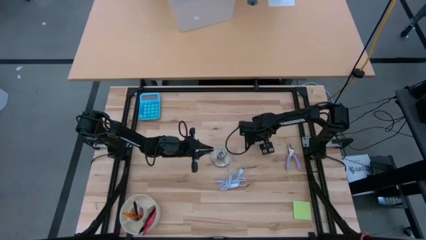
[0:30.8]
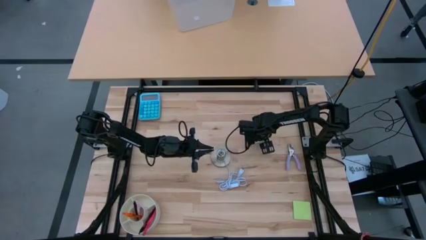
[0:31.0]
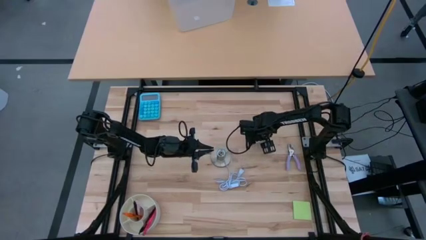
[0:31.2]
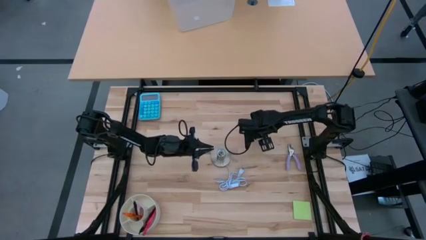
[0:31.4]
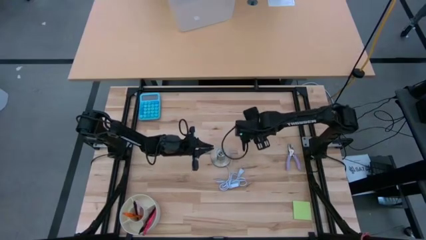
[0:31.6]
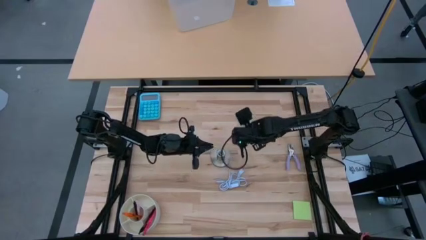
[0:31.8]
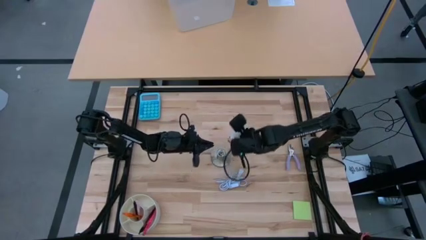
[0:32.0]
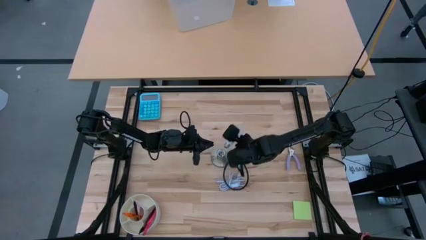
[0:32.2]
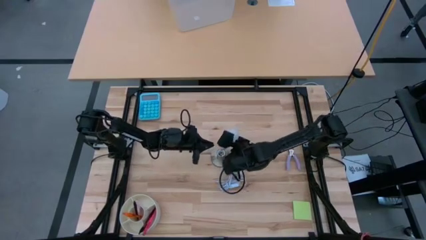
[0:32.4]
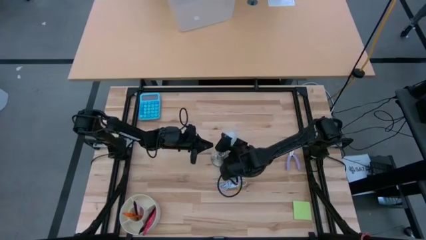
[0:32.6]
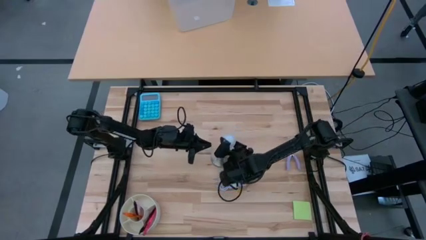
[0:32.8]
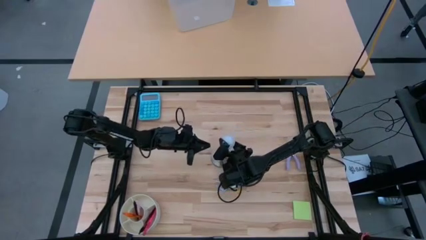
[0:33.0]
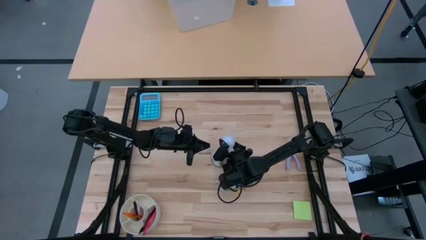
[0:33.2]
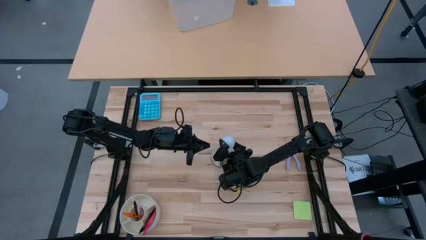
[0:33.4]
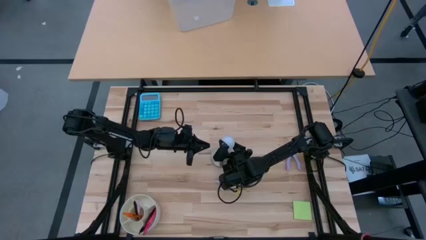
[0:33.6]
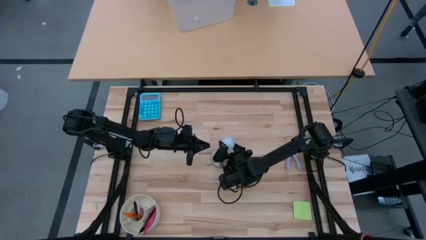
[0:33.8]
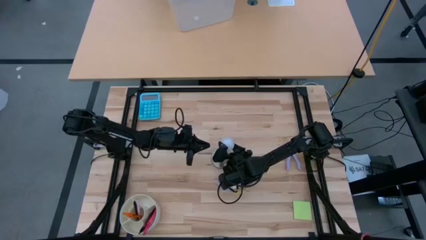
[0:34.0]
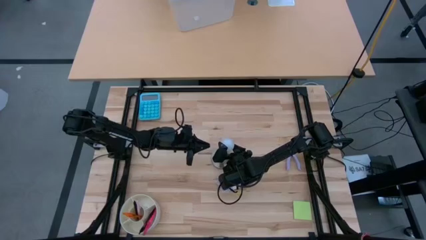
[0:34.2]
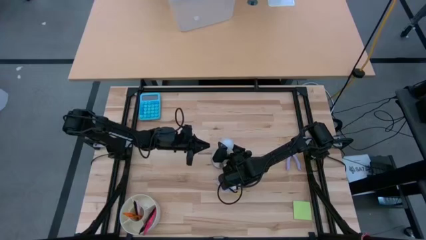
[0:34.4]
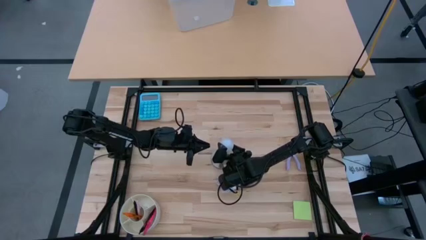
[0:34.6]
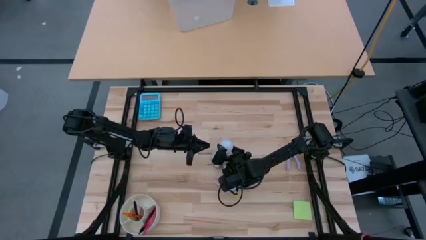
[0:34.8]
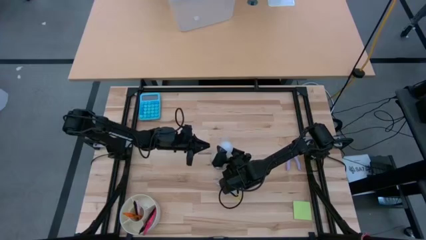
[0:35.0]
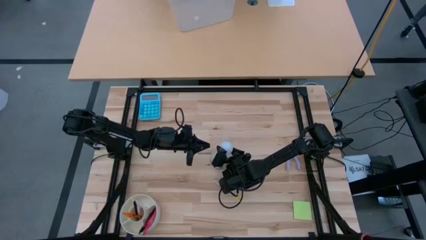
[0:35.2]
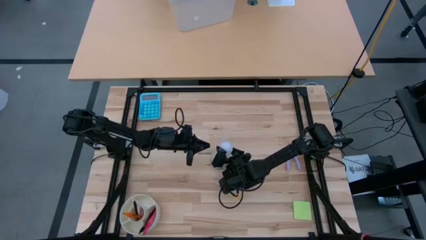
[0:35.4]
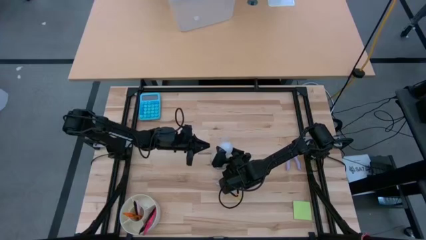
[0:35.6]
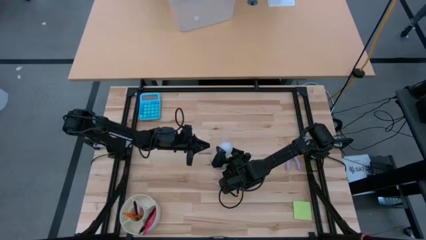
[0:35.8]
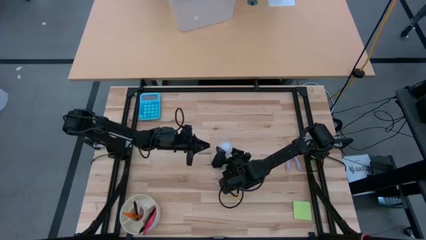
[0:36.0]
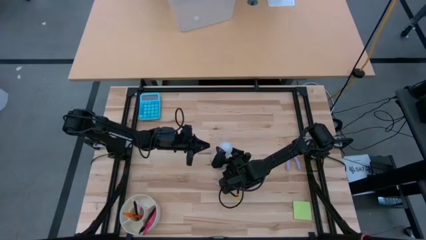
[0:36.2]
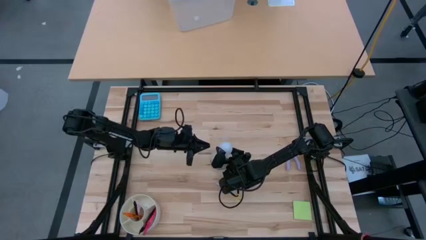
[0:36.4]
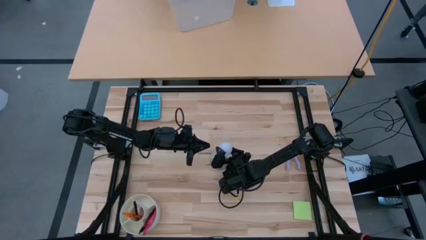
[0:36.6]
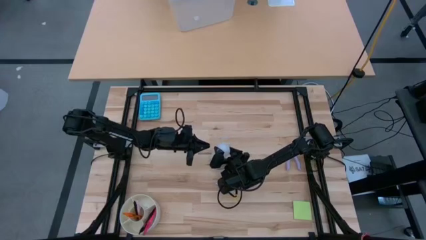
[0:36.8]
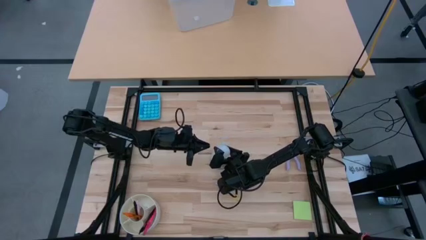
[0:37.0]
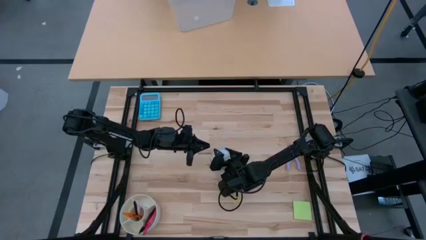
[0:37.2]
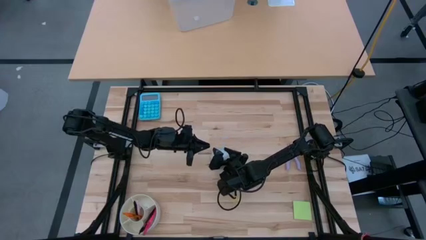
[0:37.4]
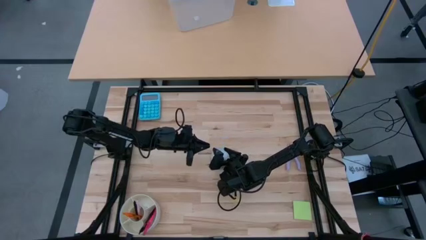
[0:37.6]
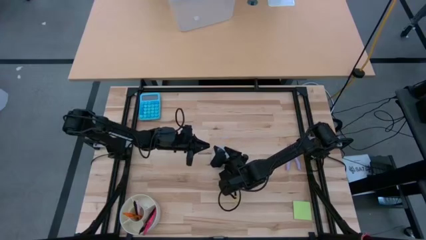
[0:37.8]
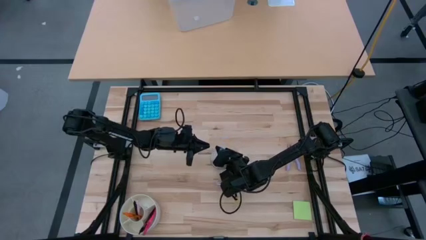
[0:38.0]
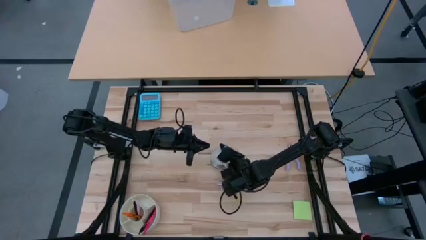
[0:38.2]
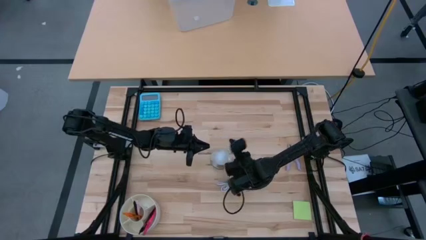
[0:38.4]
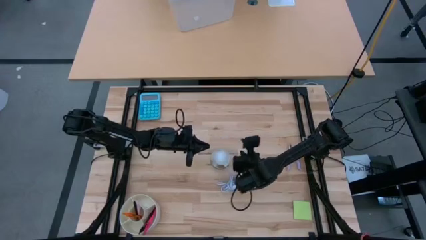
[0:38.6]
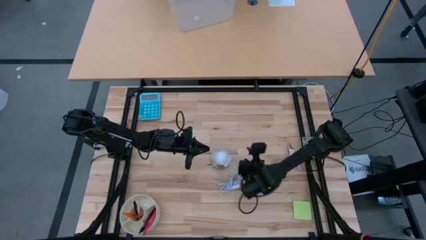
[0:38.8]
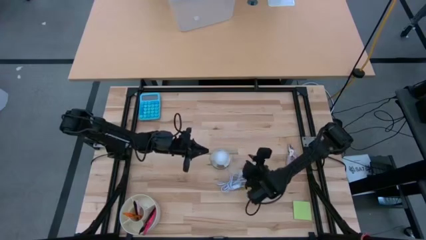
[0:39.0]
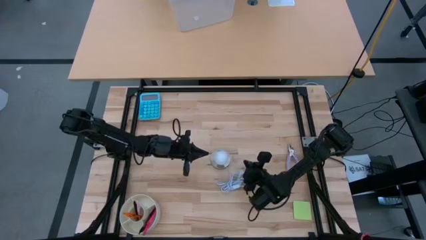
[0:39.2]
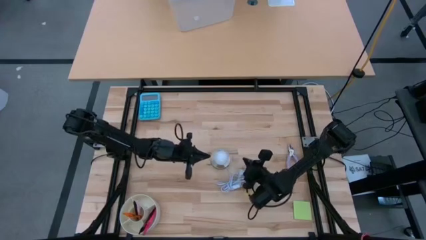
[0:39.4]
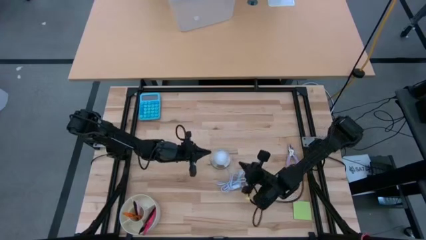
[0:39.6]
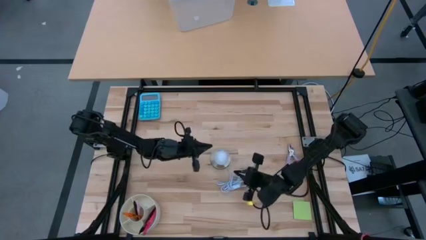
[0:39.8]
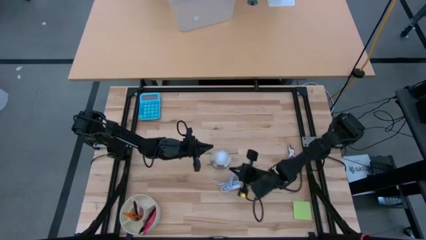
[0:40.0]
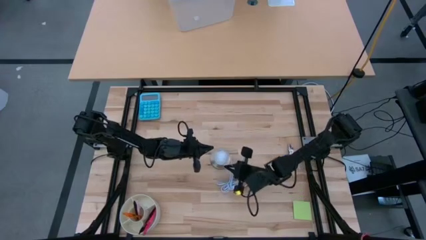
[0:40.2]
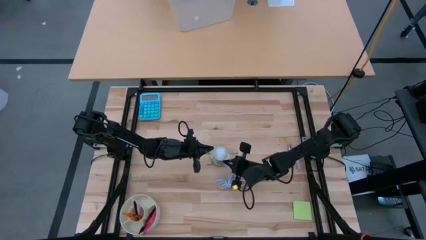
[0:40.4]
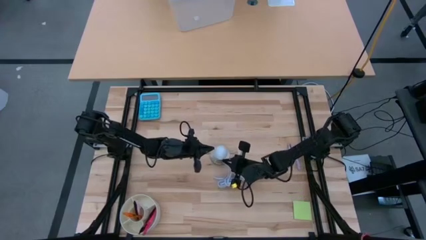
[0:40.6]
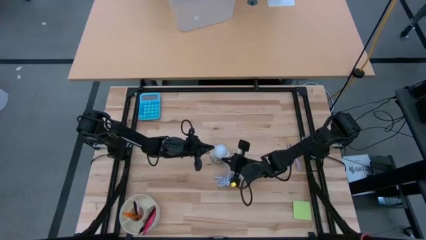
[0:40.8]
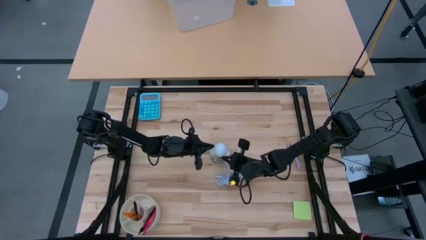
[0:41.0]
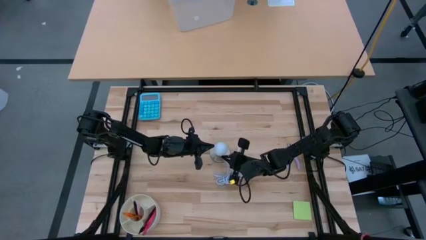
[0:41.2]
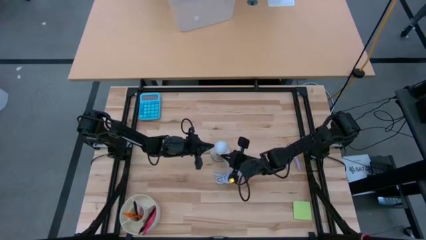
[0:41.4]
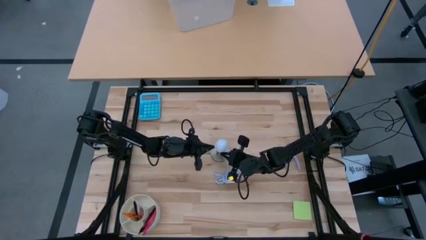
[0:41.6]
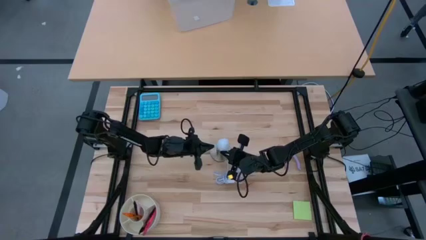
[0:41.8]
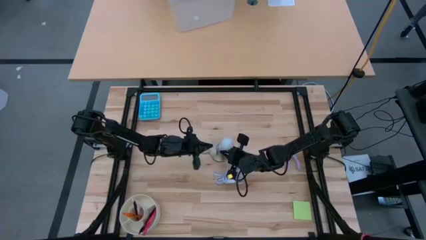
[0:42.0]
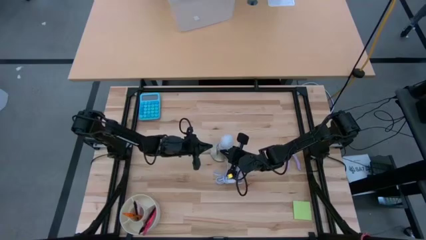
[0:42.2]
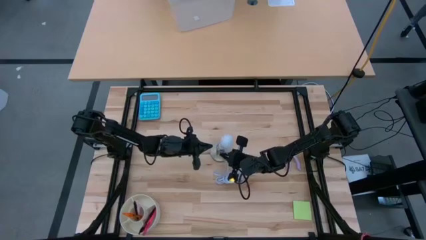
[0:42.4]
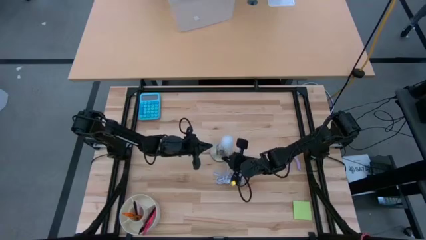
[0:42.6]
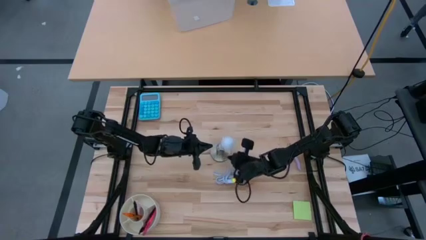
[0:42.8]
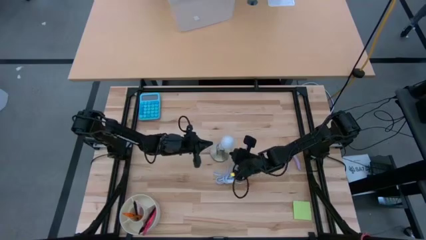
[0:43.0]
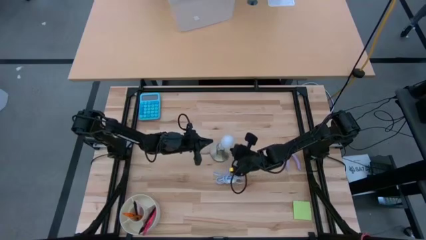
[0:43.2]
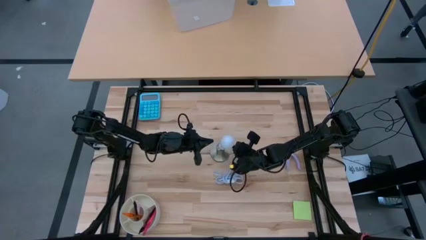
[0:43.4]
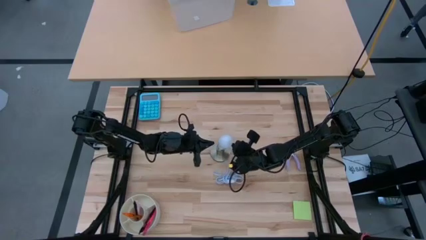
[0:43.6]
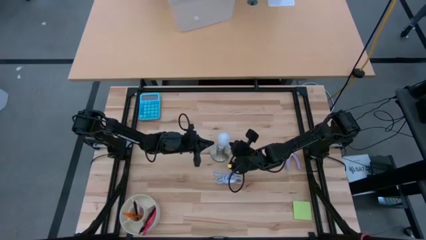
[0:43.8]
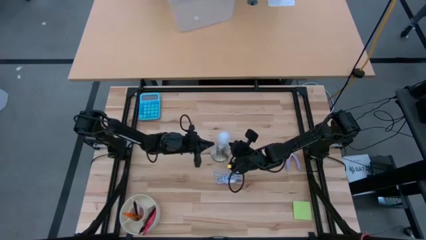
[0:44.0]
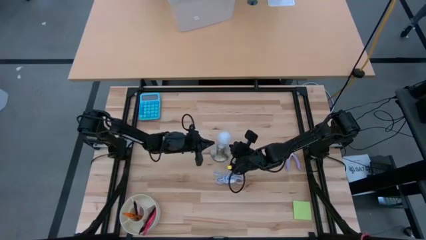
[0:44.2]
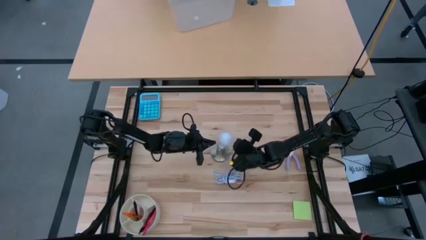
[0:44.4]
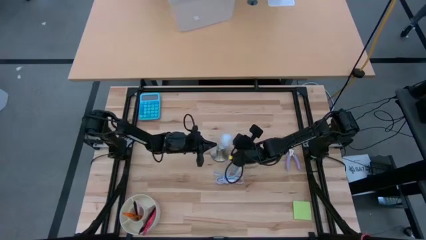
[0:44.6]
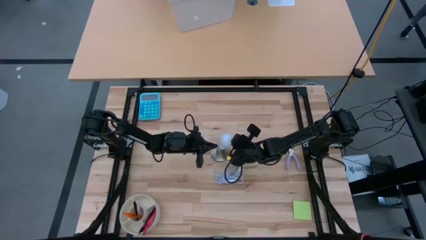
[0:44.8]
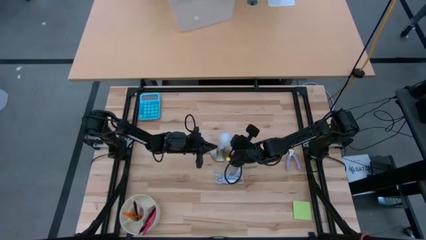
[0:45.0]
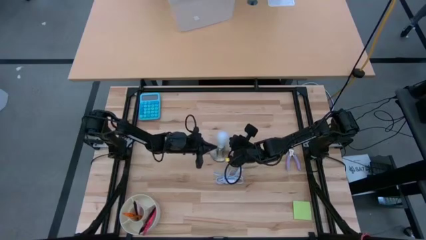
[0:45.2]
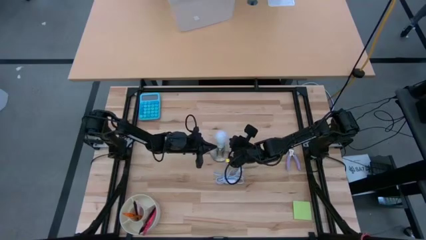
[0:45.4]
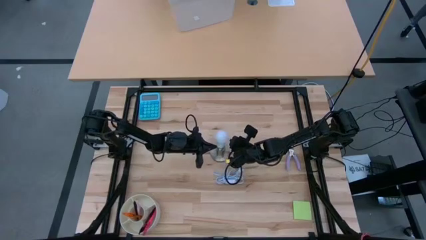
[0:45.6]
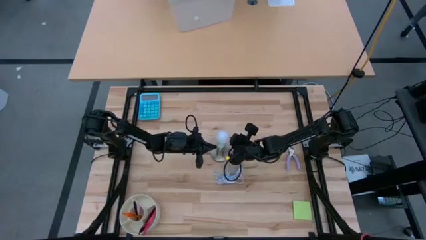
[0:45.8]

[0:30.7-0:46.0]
Task: Screw lightbulb
Insert the light bulb into the lamp
